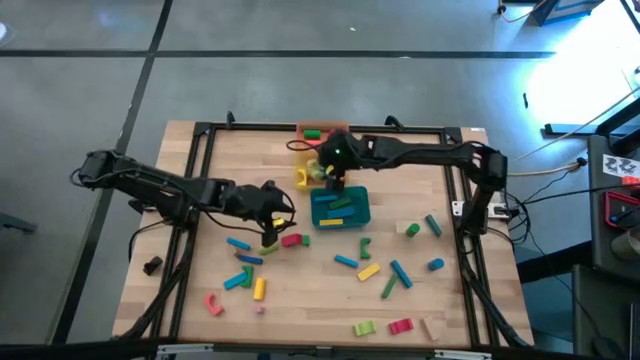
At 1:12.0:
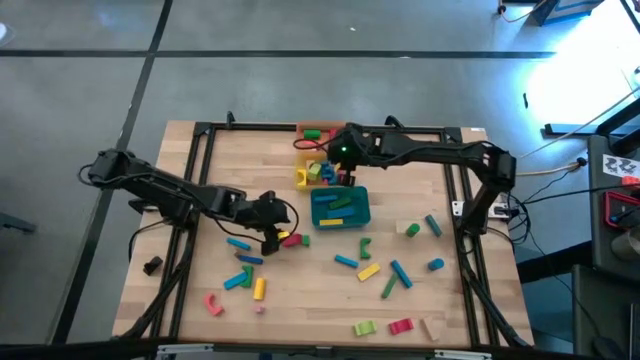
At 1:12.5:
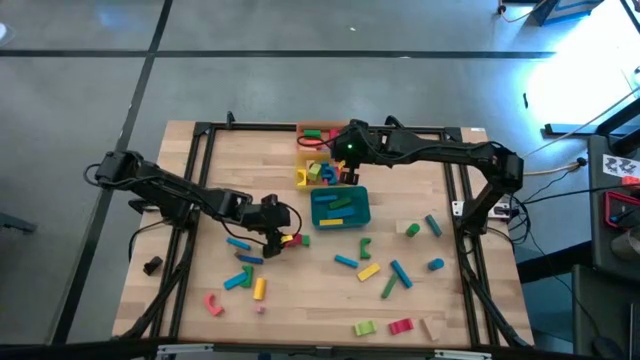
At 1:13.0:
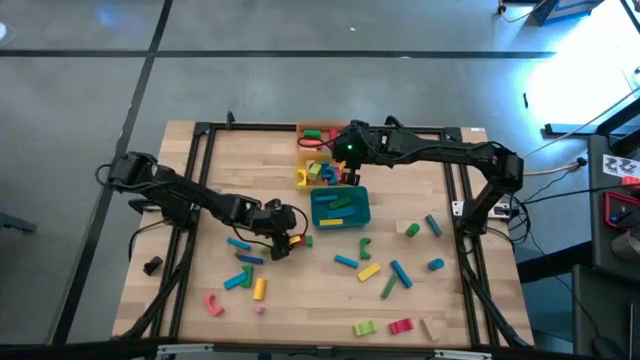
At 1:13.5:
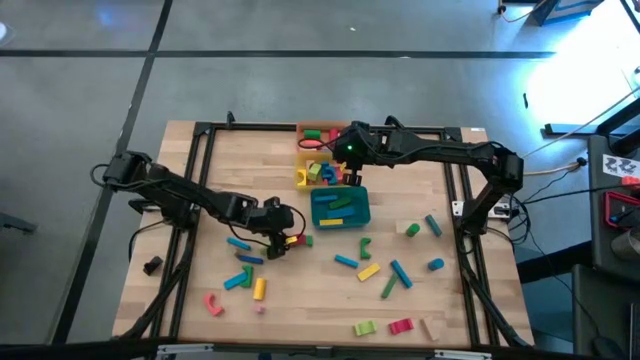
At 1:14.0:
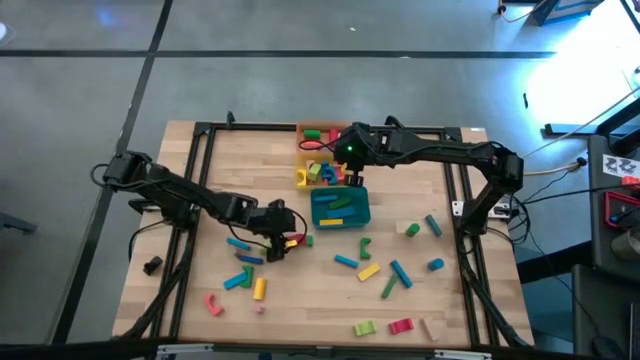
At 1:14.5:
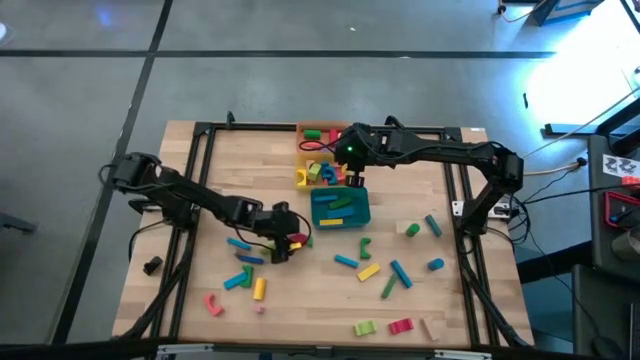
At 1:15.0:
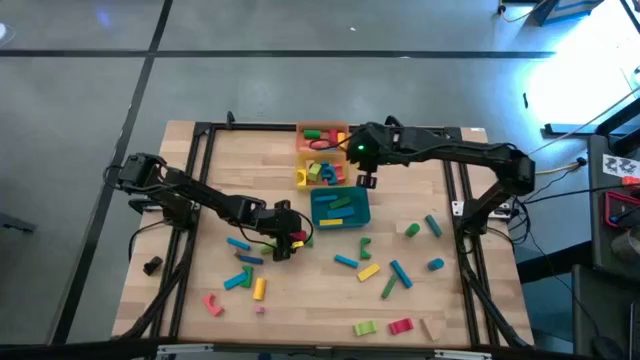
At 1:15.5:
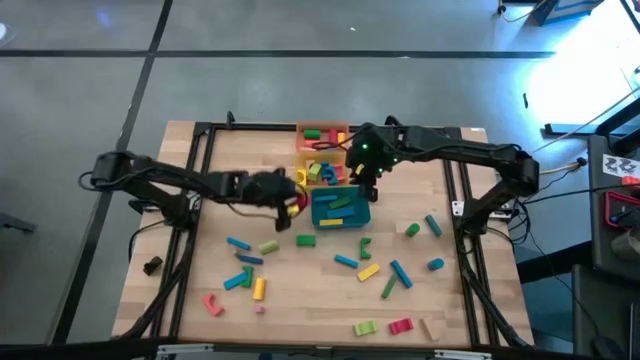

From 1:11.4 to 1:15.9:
Task: Sort blocks by size
Put the red arch block into the yellow bin

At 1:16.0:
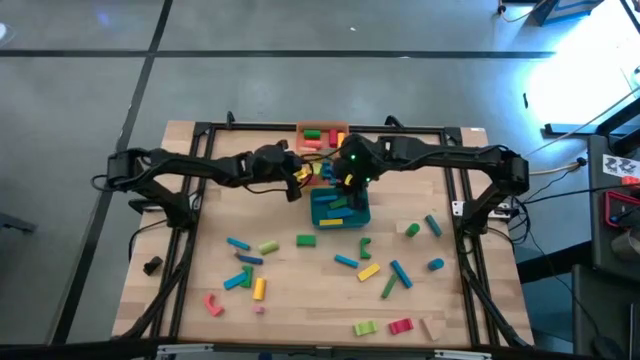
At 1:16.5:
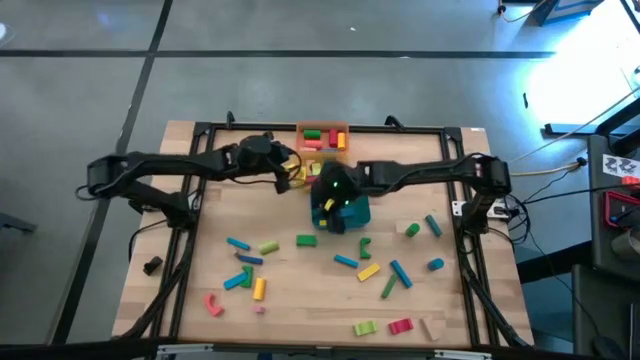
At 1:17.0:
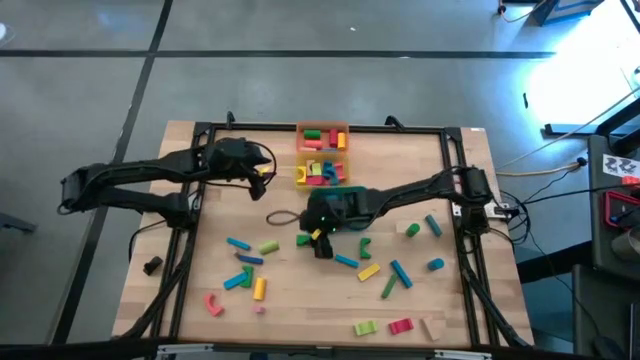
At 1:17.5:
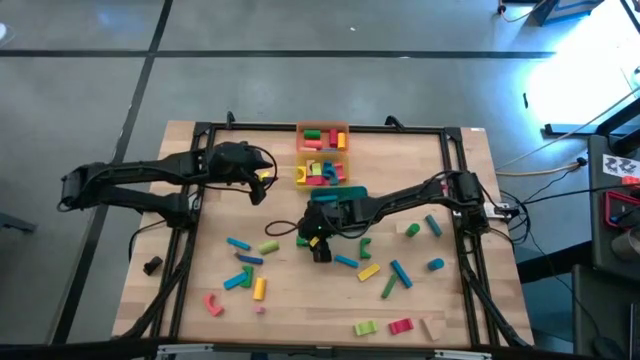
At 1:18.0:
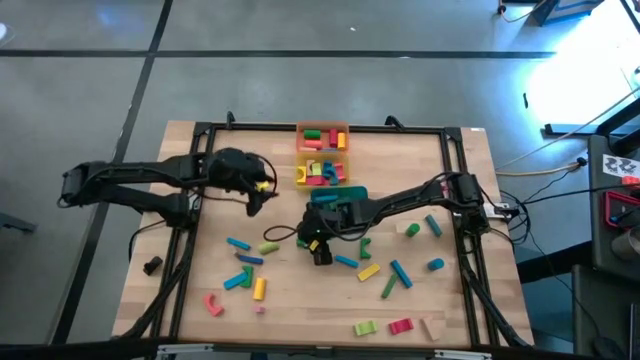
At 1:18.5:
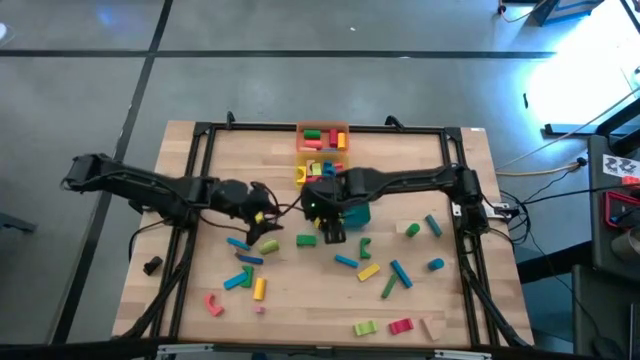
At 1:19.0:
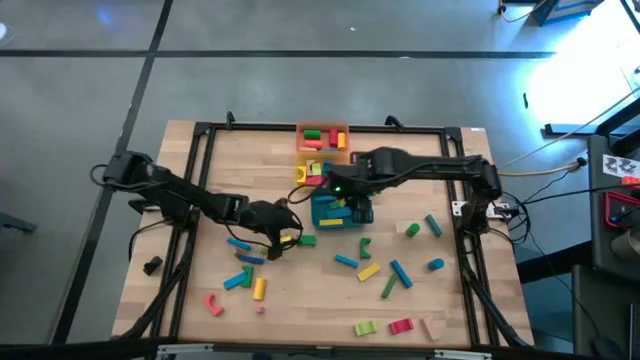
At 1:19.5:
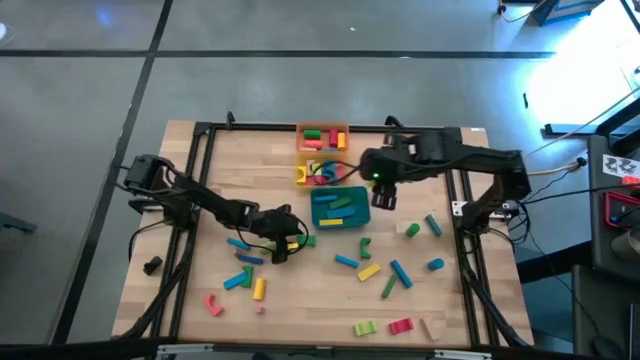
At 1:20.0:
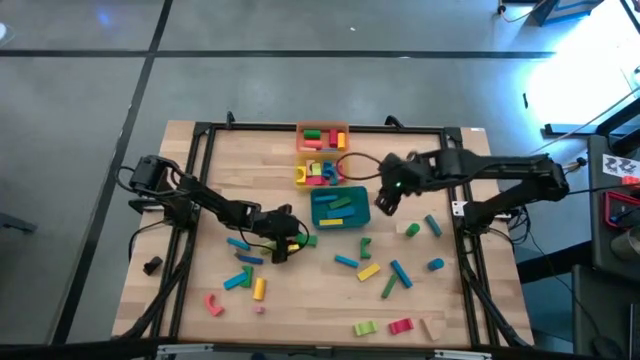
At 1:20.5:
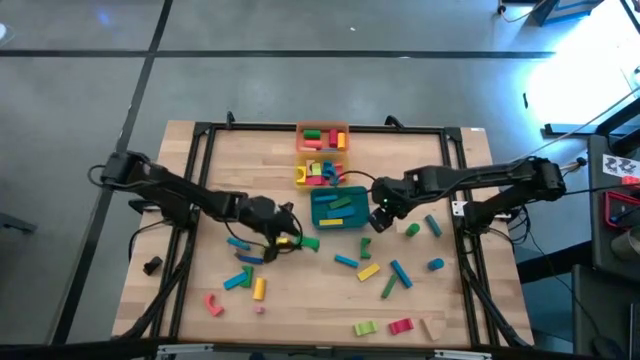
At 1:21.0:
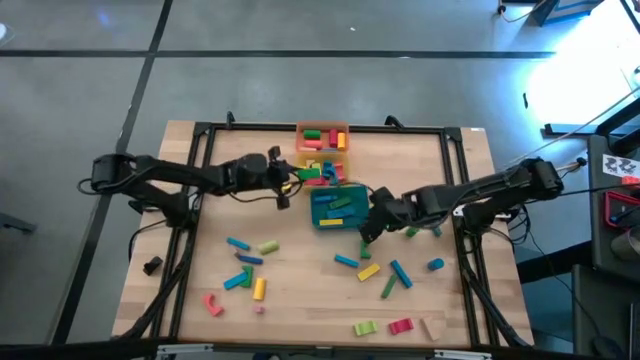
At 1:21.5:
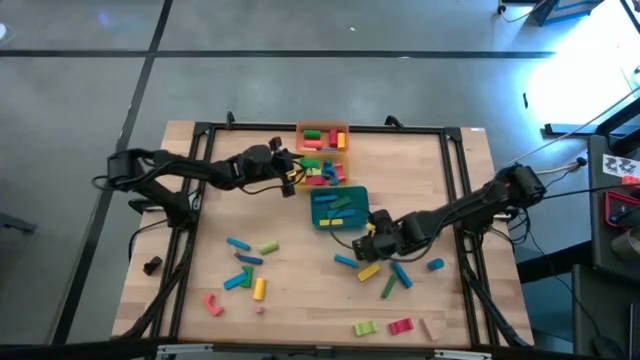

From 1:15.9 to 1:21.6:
Put the green arch block into the yellow bin

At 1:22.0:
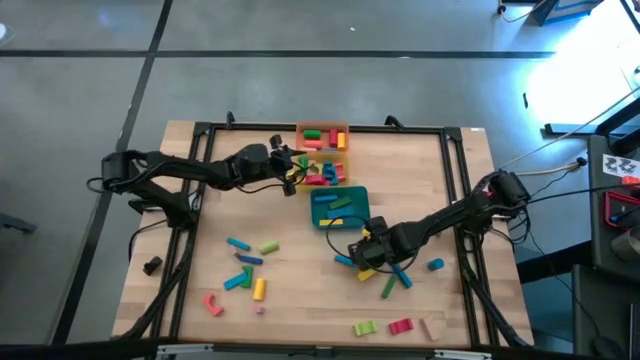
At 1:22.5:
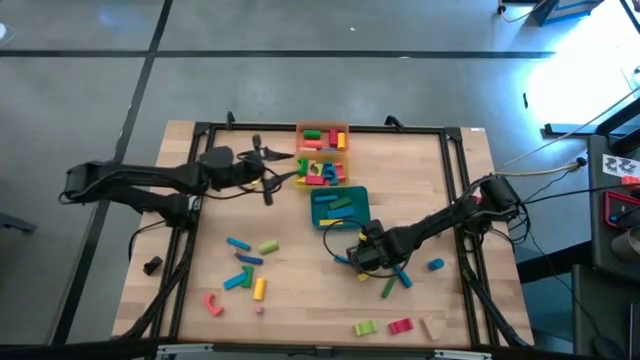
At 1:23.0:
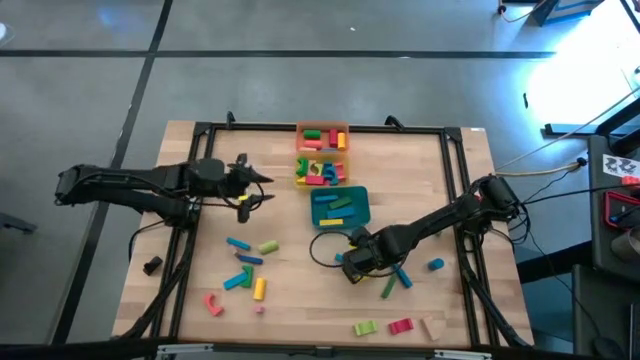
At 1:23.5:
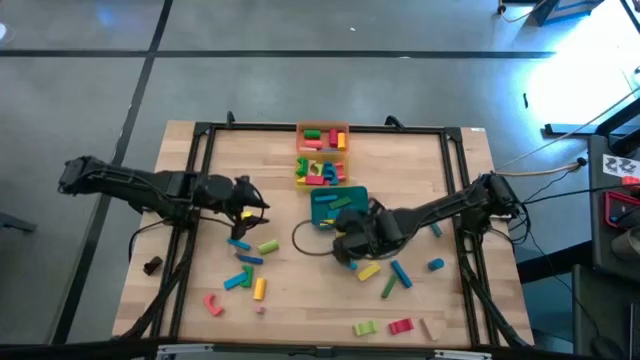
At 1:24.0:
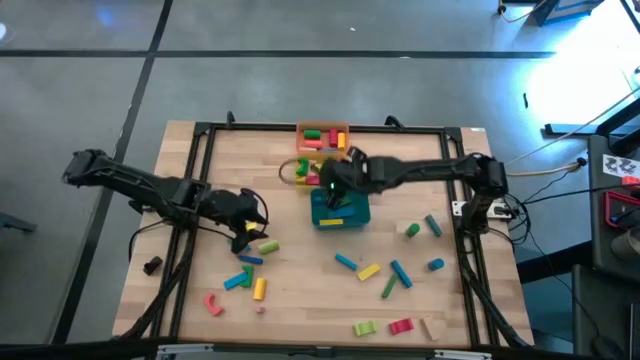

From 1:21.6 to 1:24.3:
Put the green arch block into the yellow bin

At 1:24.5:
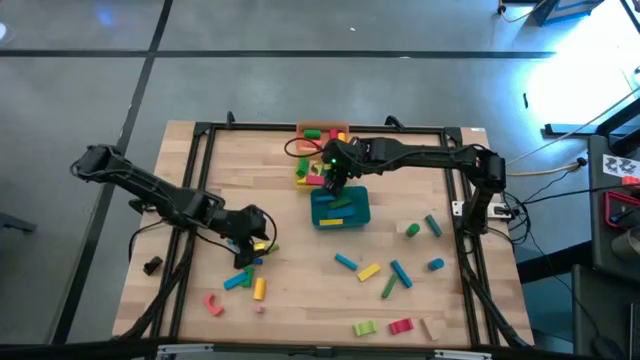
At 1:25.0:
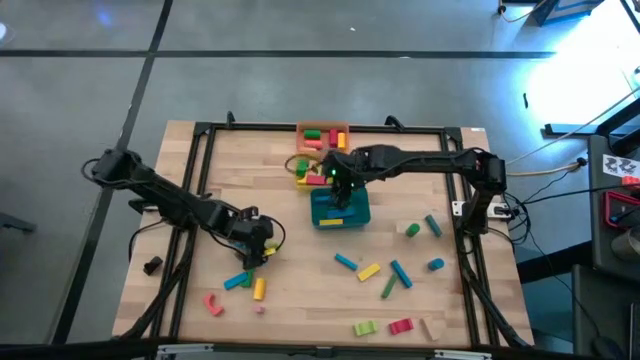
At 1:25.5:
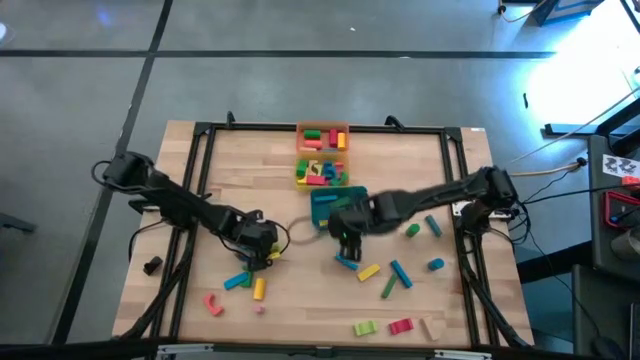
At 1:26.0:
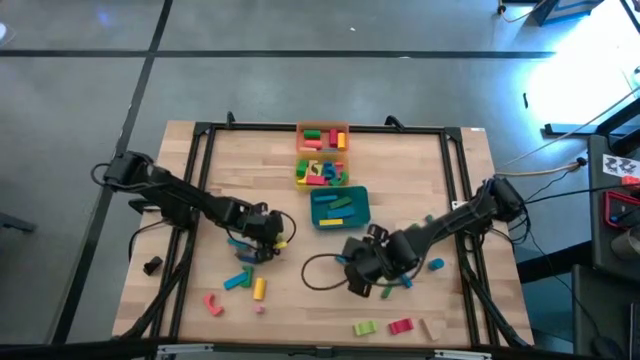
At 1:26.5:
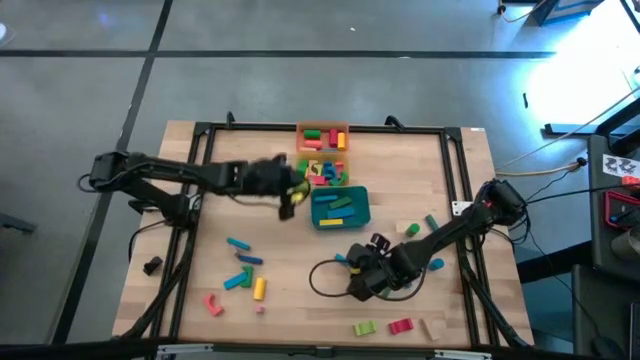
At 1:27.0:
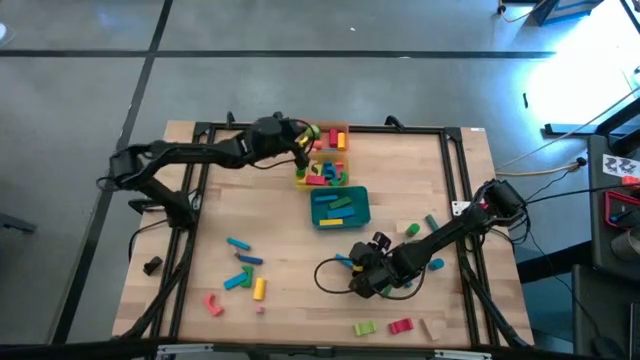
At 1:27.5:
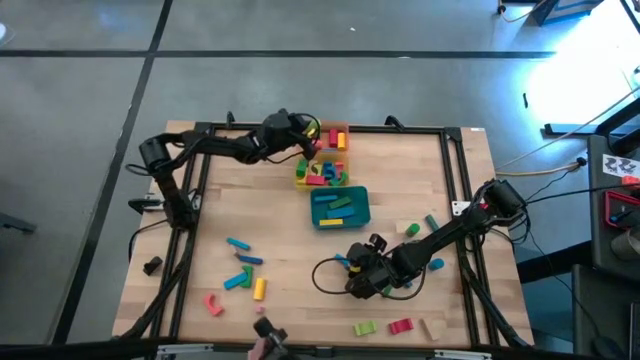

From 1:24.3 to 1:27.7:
Put the green cylinder block into the yellow bin

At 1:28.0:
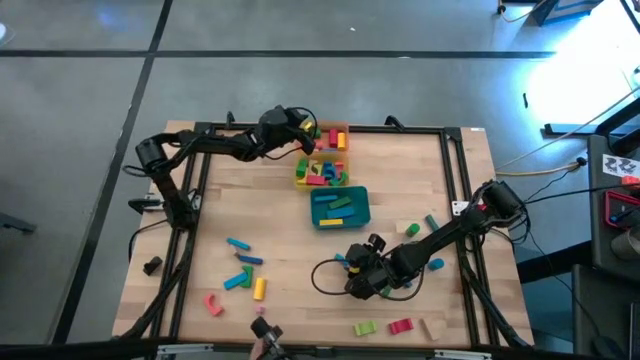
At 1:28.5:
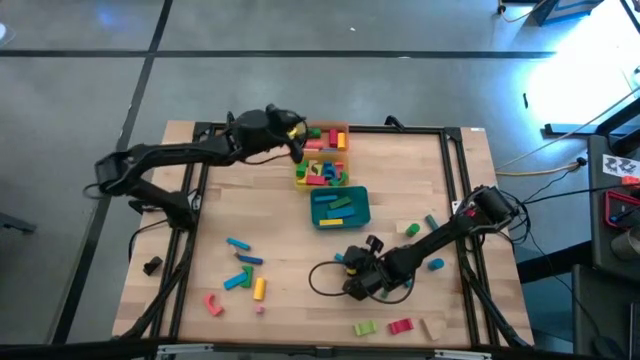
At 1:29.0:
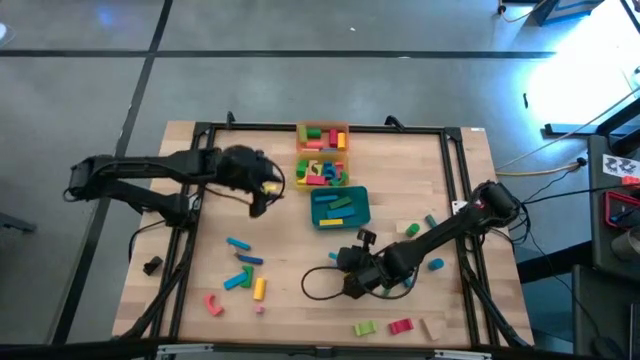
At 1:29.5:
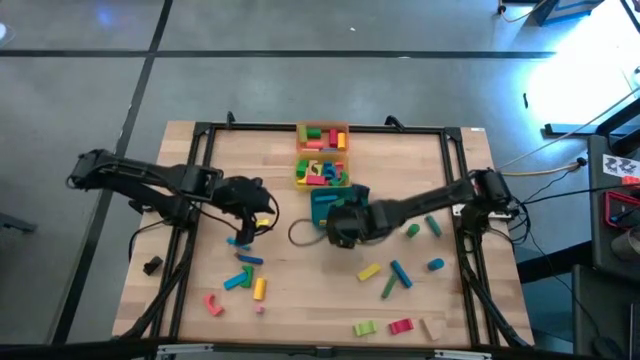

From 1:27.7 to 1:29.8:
Put the blue rectangular block into the blue bin

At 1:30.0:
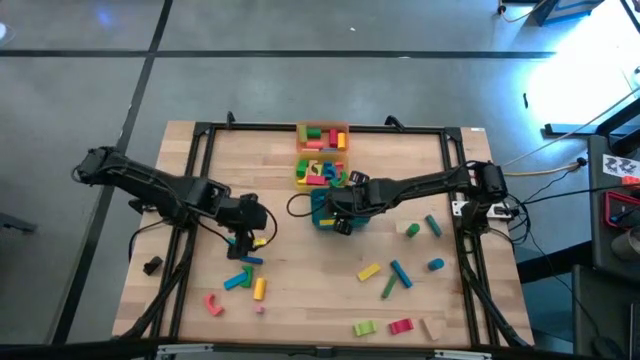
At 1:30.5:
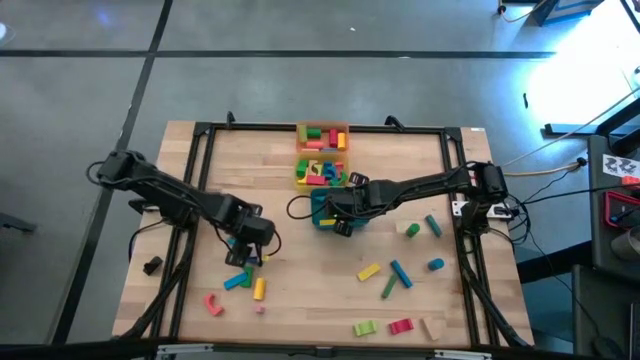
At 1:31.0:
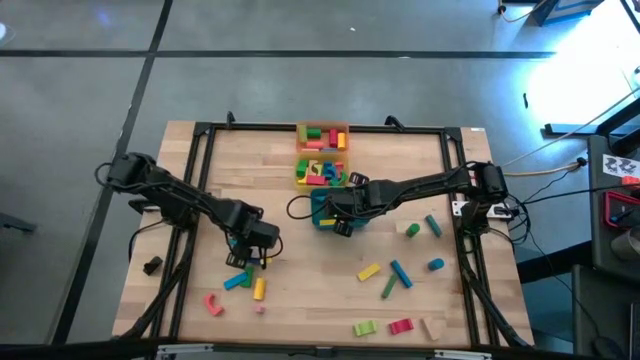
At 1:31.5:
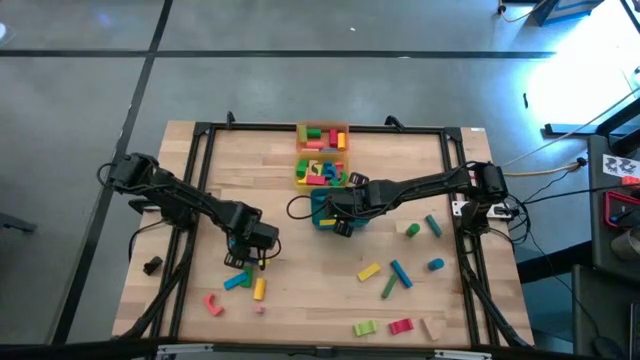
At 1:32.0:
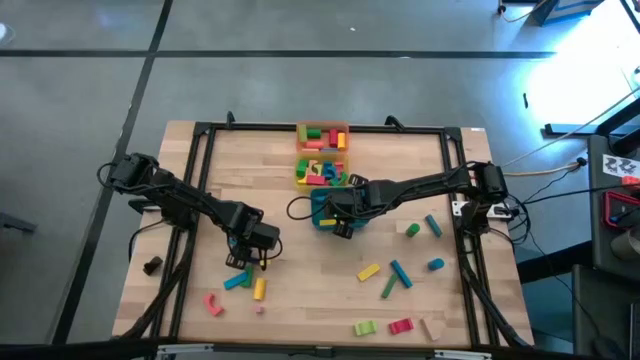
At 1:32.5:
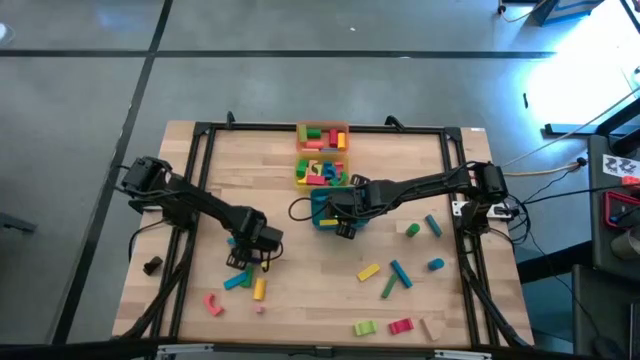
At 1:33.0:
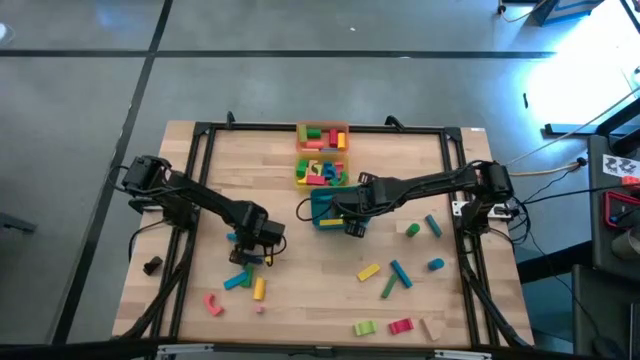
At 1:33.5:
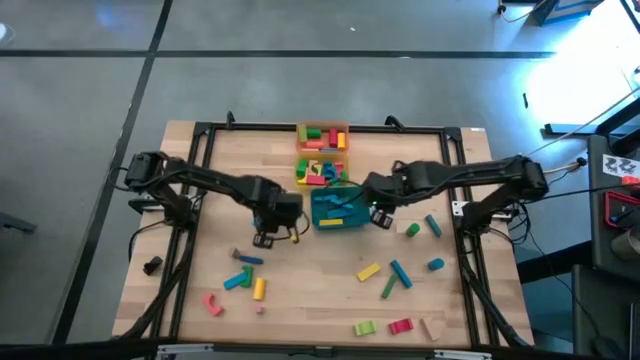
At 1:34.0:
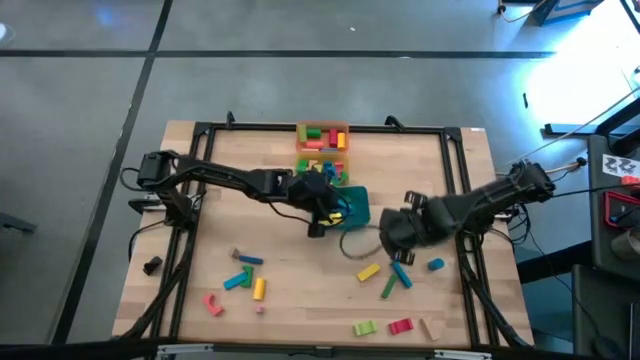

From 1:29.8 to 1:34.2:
Put the blue rectangular block into the blue bin
